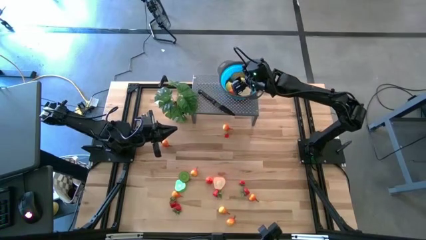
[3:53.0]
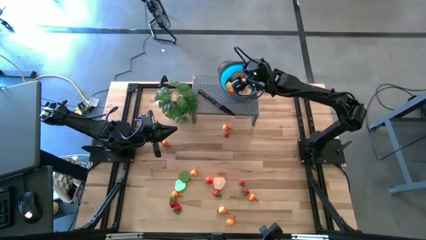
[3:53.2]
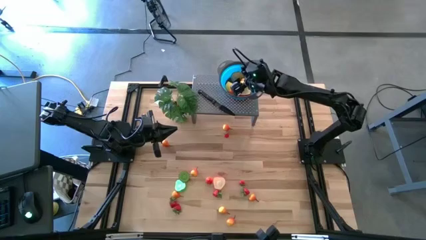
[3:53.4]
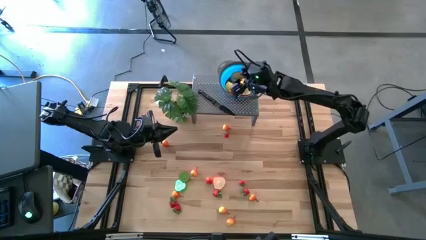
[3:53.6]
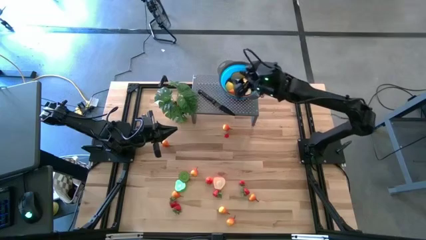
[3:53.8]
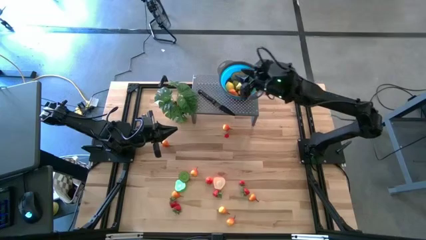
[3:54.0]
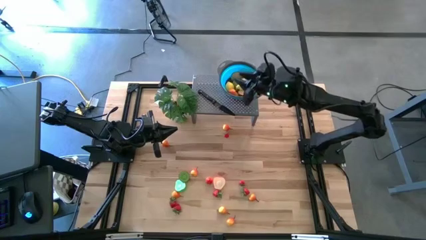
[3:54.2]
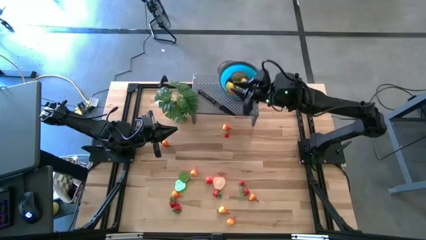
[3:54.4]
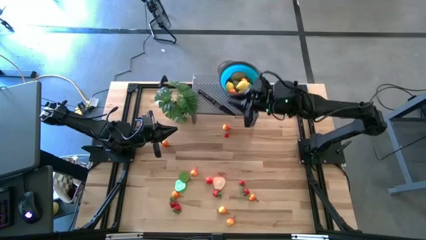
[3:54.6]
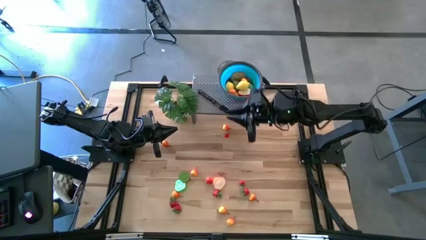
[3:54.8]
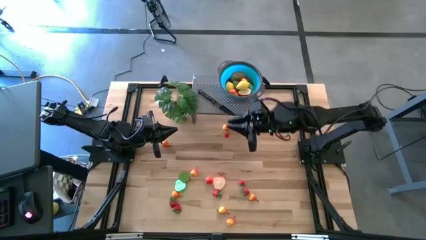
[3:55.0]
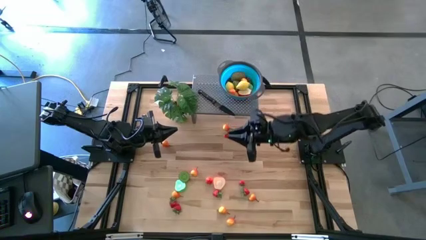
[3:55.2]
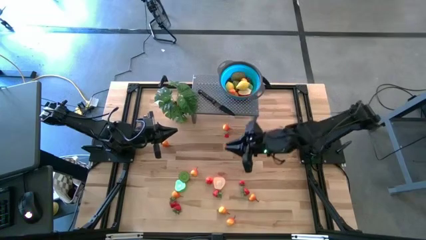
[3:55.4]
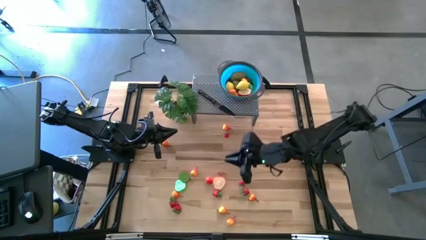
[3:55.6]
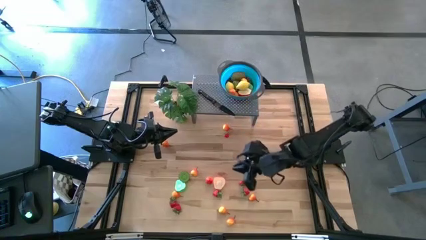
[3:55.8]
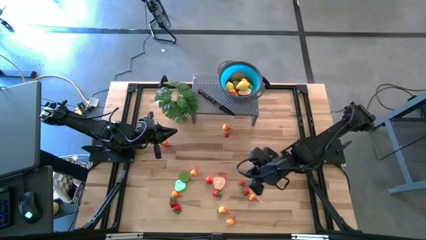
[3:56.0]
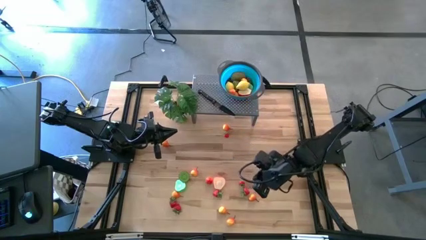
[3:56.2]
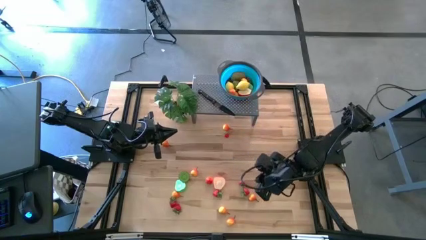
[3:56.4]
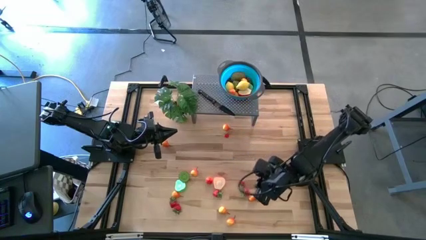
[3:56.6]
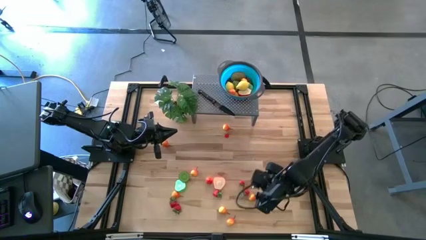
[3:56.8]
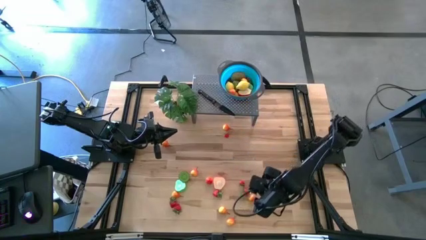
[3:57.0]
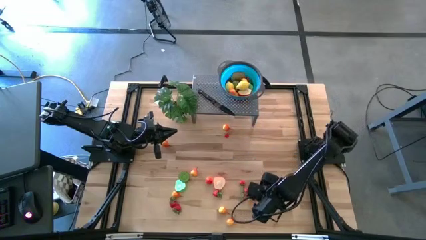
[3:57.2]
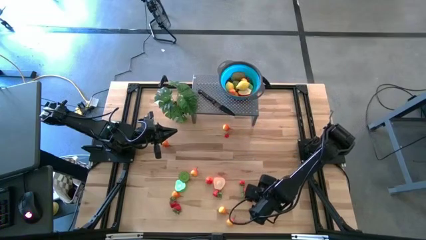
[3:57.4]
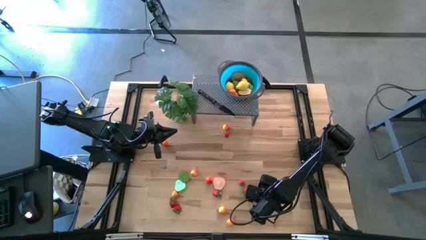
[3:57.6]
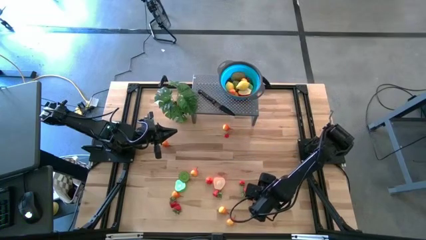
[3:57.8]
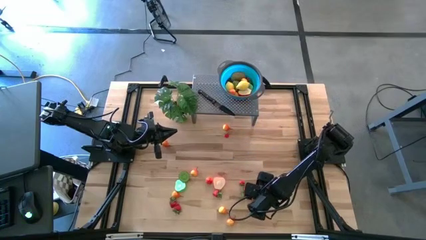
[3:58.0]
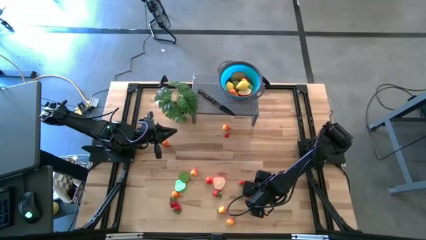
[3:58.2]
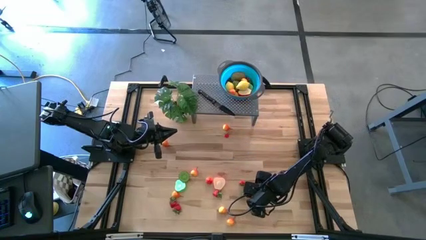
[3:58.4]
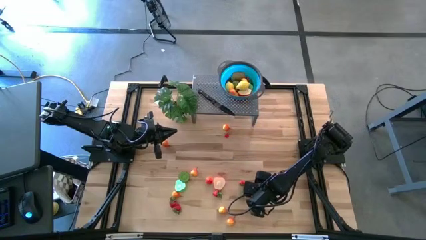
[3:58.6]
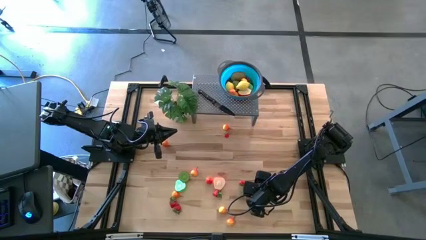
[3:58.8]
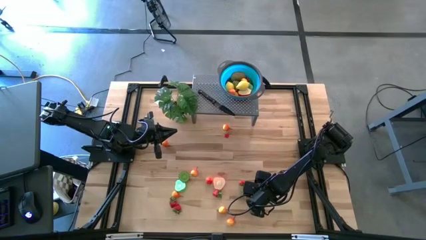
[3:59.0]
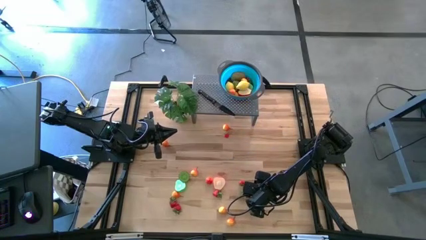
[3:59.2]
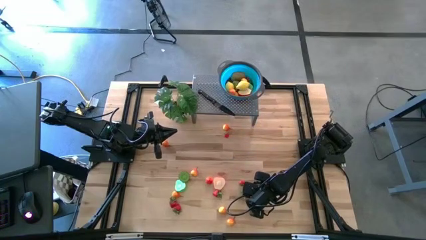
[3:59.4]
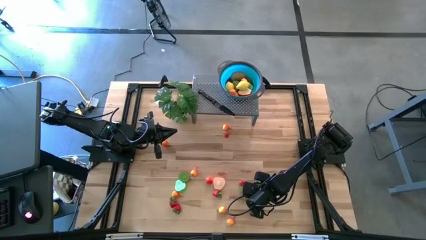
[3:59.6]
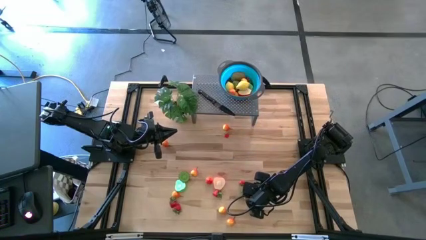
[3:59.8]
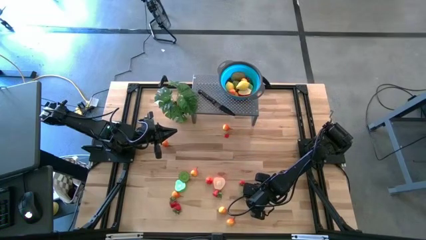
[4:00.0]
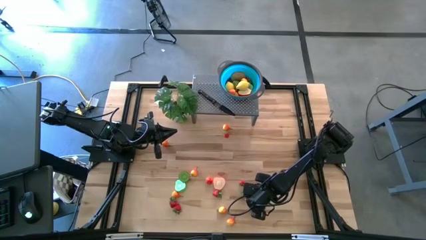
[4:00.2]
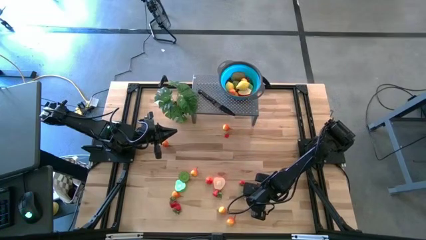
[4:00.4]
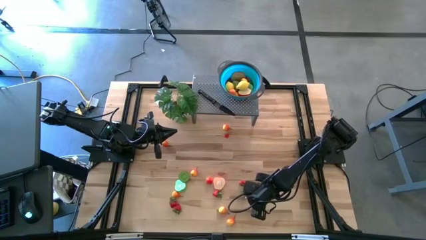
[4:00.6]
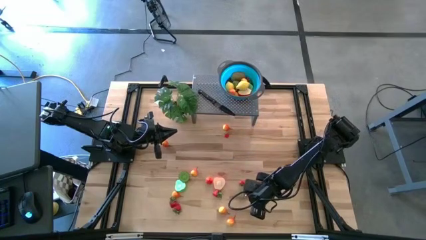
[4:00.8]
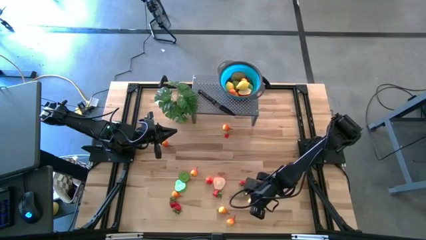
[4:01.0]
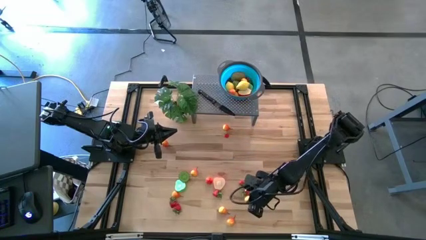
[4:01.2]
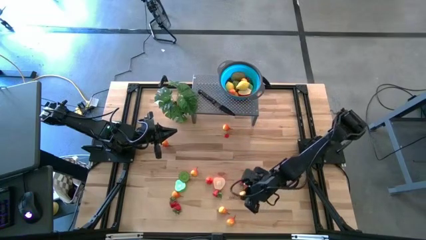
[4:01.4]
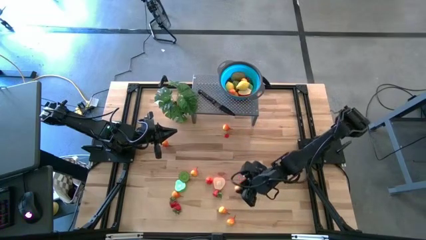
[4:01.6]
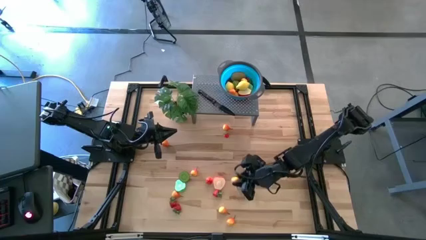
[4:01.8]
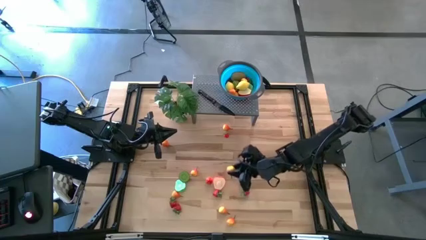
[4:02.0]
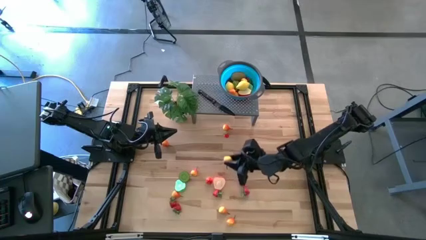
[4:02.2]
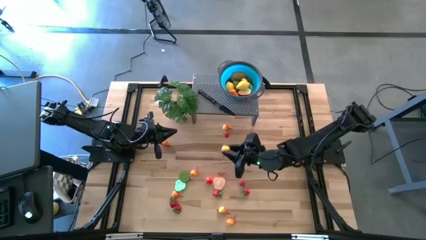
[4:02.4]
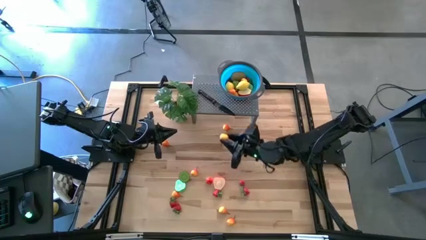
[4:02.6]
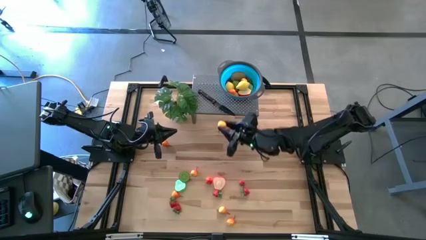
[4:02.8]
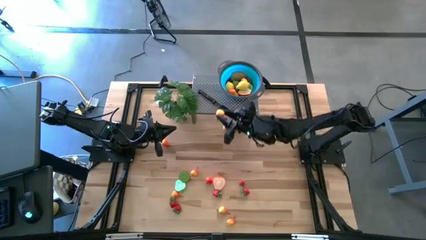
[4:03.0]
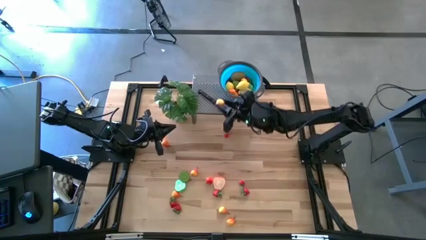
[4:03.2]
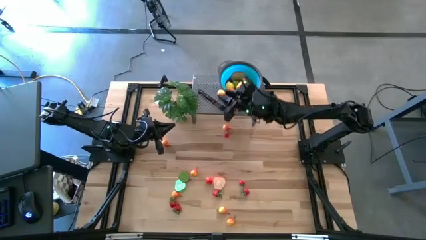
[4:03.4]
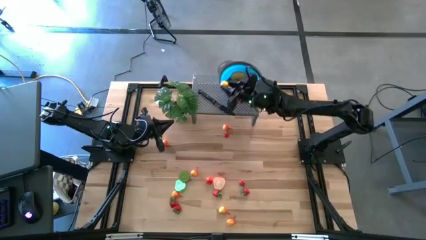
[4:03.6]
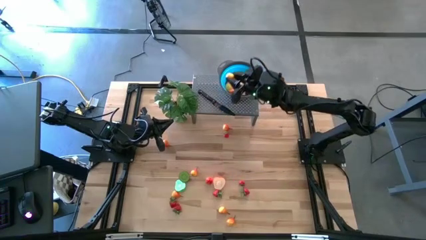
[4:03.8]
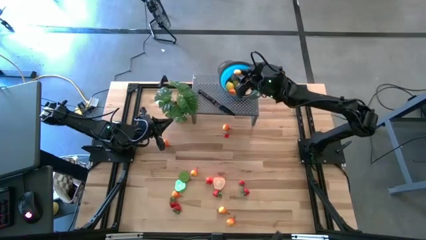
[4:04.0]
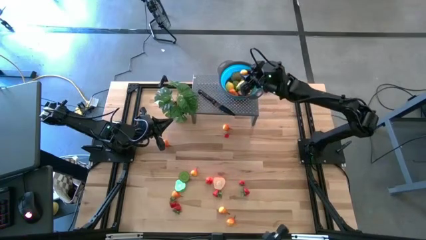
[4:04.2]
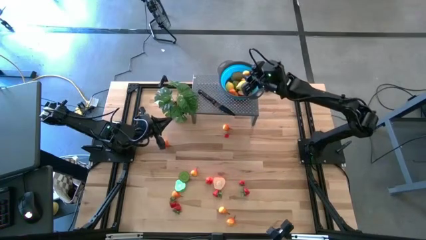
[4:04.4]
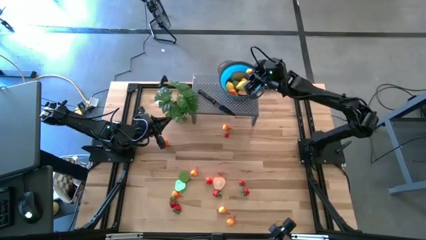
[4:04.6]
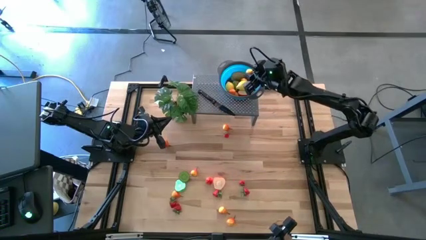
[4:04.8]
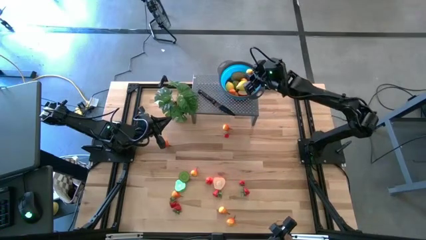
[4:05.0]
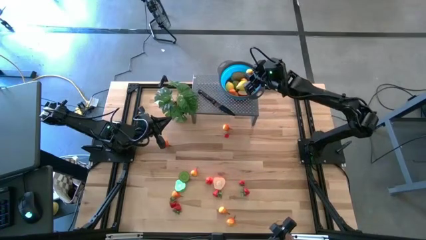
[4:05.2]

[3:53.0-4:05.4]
Task: Pick & Place Fruit
Put the yellow pear in the blue bowl on the shelf

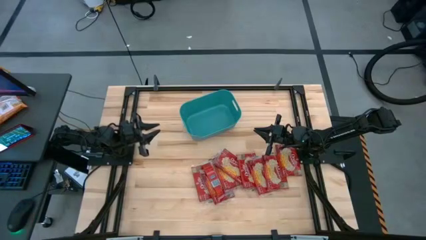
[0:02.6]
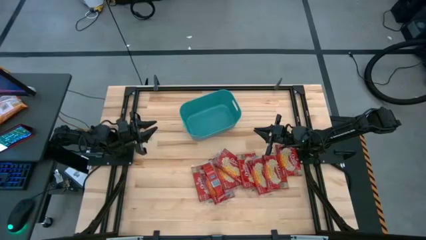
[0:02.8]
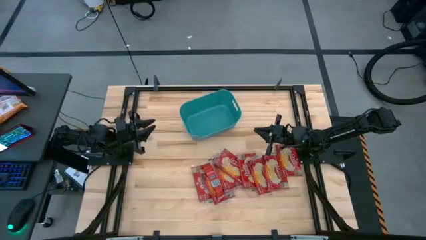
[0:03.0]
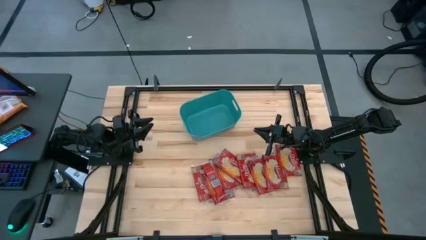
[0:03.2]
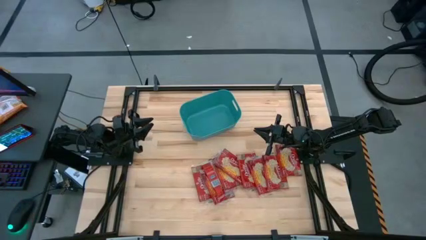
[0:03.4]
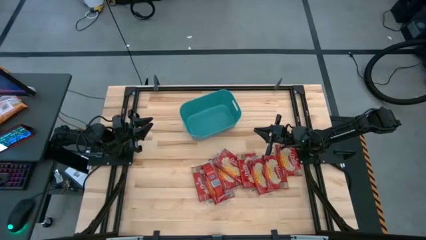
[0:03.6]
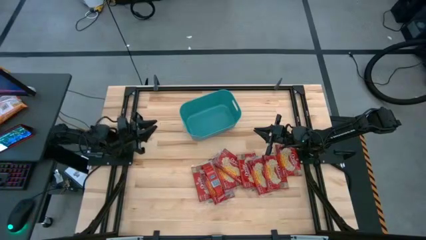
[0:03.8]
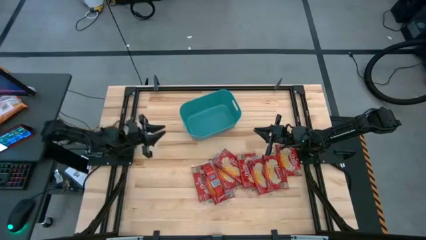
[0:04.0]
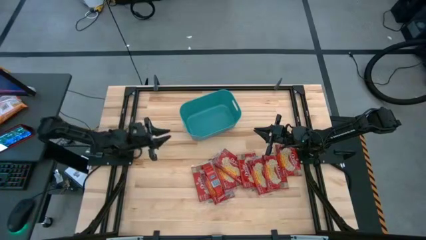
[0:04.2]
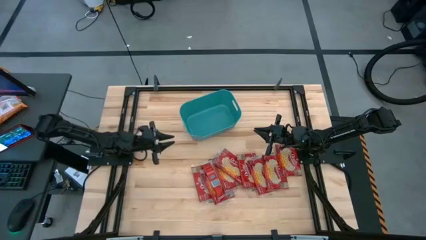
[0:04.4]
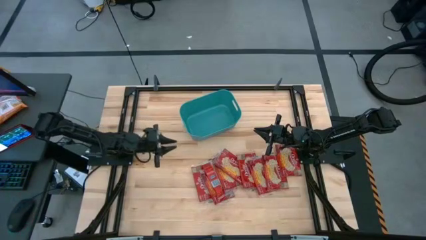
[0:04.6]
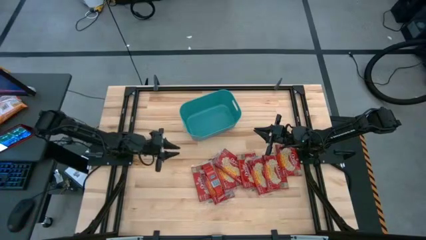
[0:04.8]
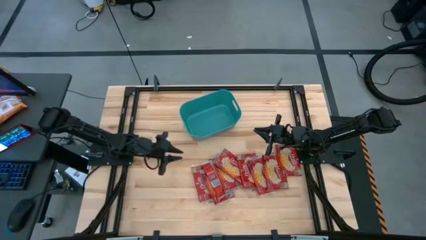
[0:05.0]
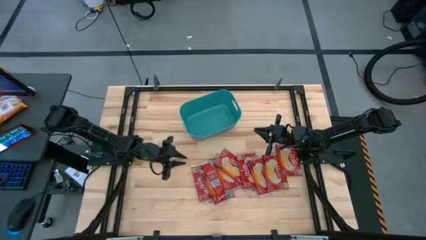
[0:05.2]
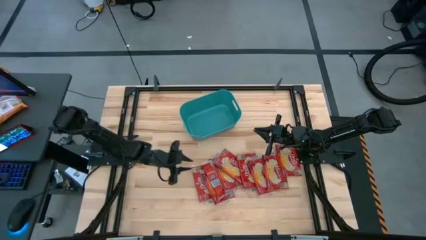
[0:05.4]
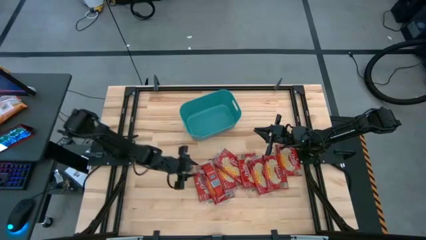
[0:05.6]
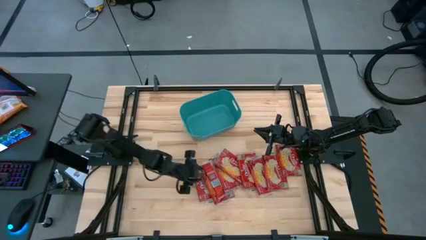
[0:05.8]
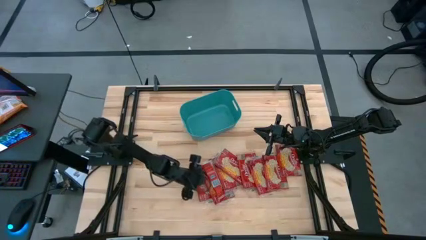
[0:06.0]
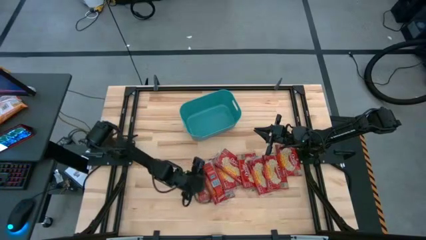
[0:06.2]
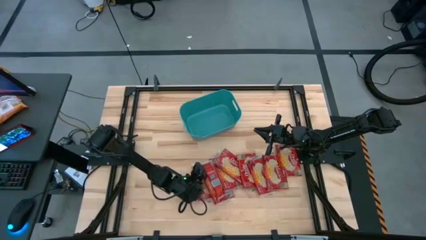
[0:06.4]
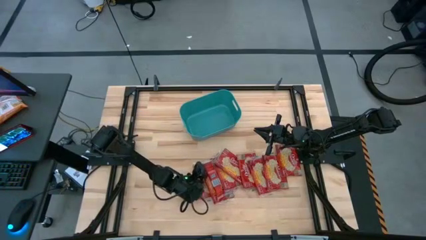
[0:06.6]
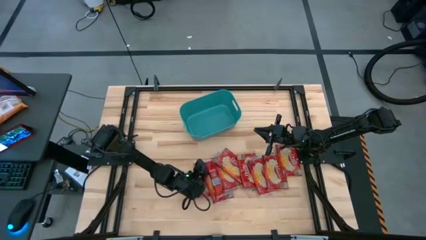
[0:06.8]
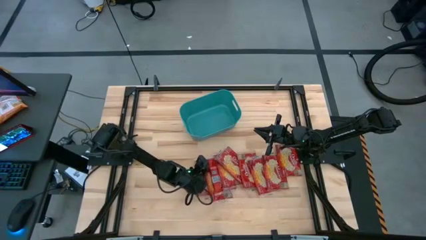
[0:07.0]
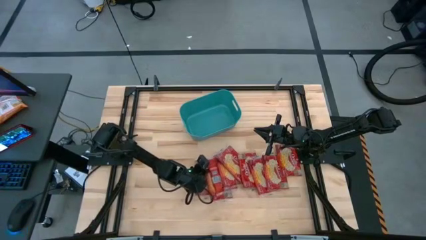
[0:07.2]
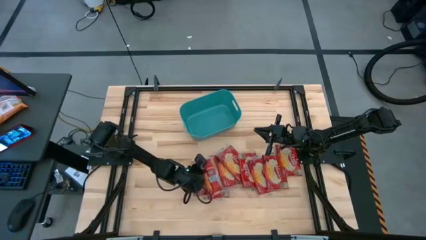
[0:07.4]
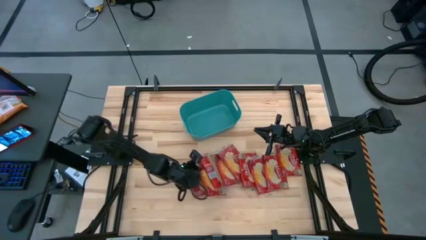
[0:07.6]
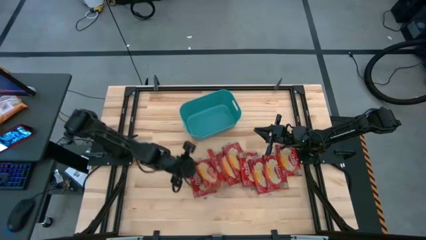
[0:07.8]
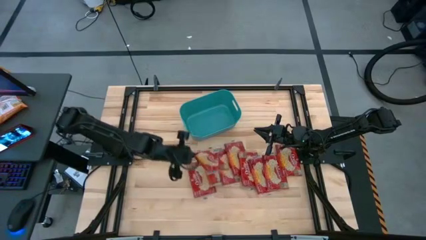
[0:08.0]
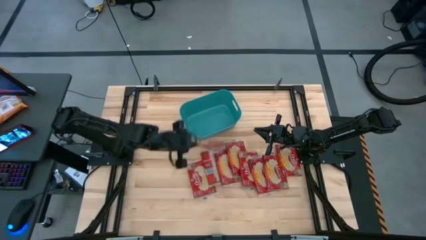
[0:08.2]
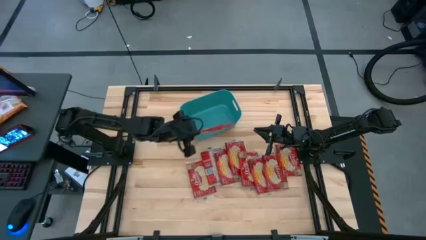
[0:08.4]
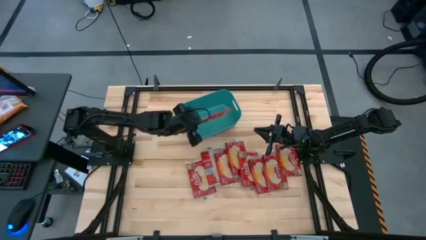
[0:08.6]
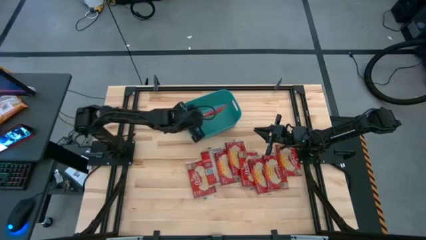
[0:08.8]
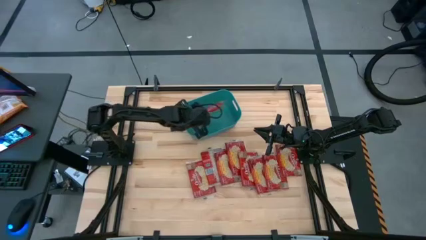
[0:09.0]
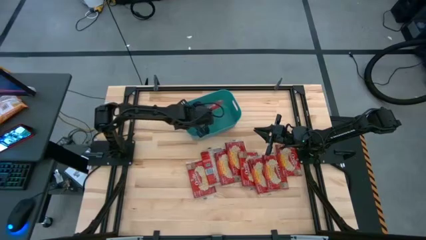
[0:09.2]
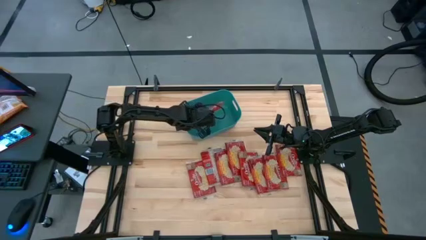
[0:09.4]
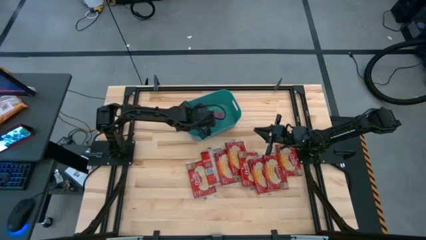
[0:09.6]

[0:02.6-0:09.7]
Task: Sort popcorn bags into baskets
Put the red popcorn bag into the green bin
